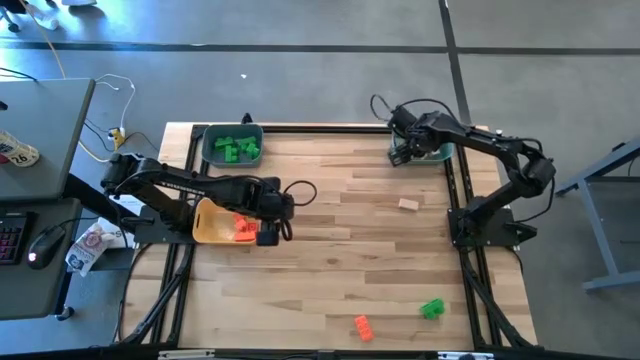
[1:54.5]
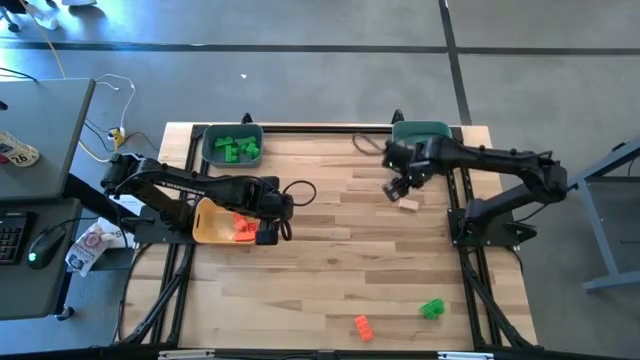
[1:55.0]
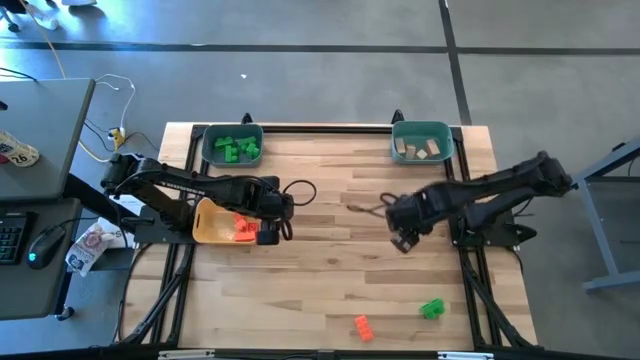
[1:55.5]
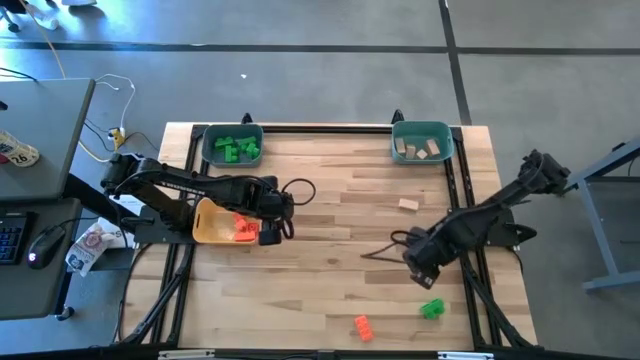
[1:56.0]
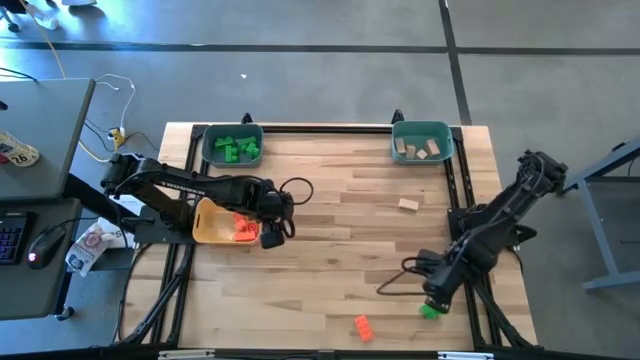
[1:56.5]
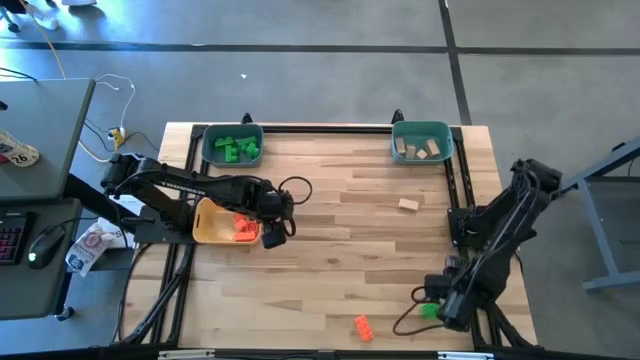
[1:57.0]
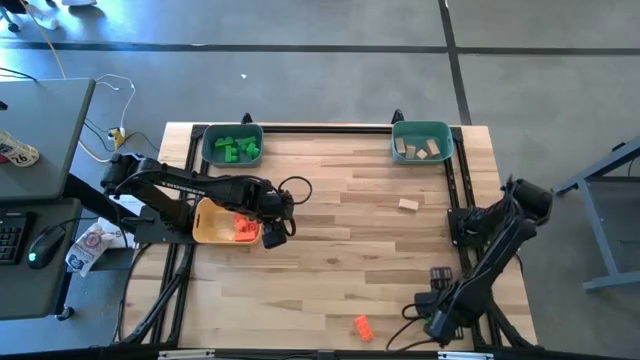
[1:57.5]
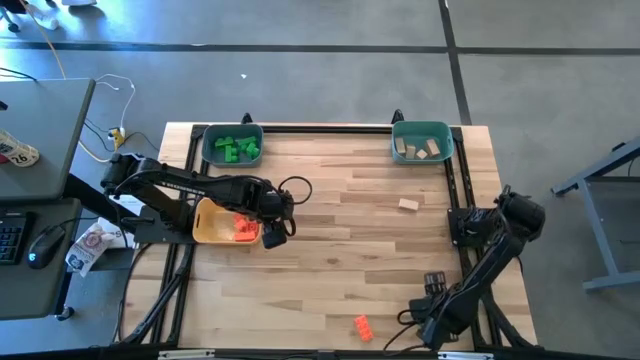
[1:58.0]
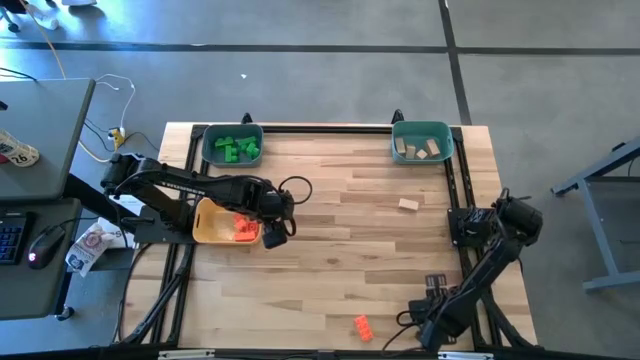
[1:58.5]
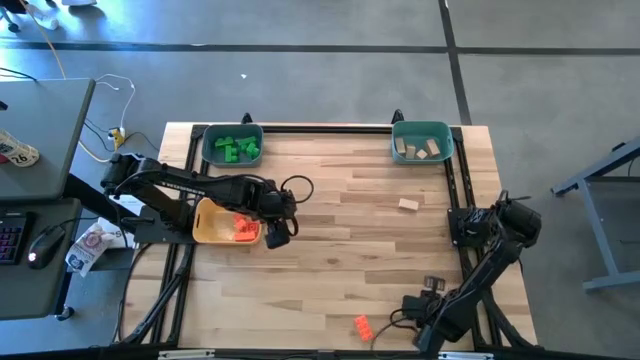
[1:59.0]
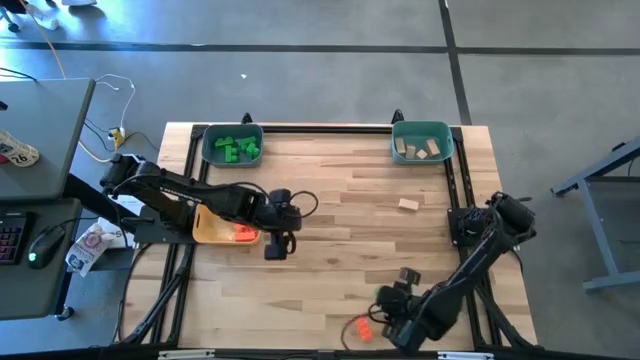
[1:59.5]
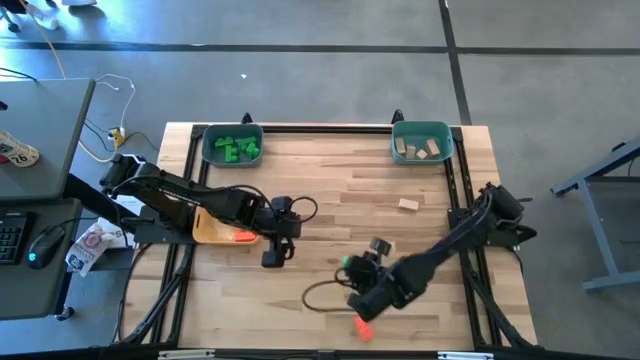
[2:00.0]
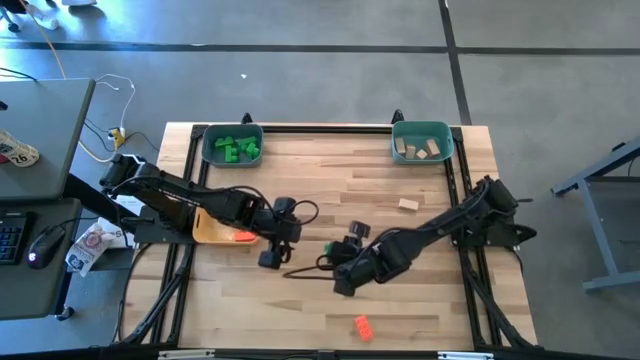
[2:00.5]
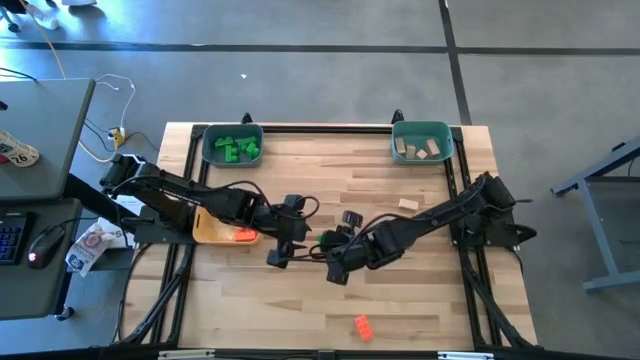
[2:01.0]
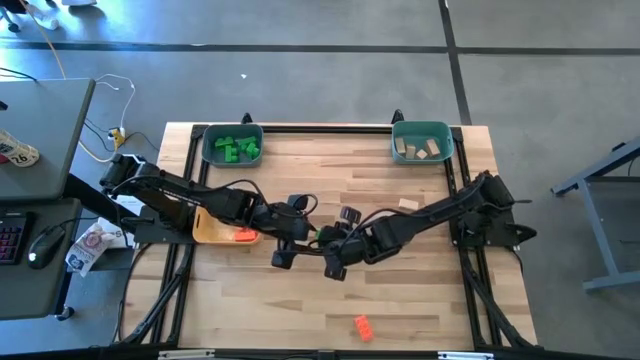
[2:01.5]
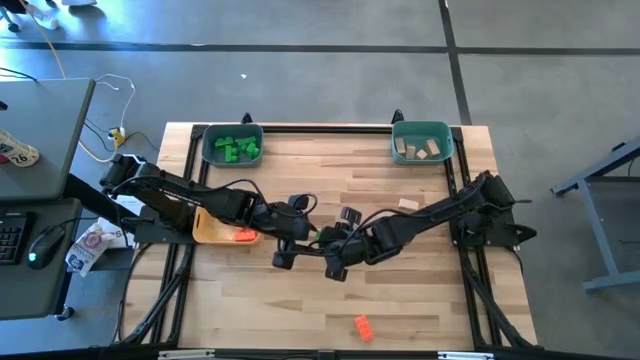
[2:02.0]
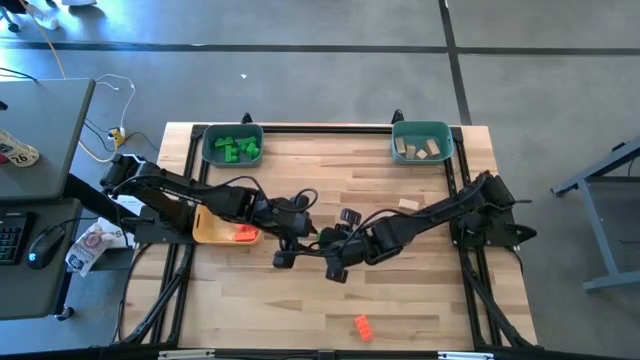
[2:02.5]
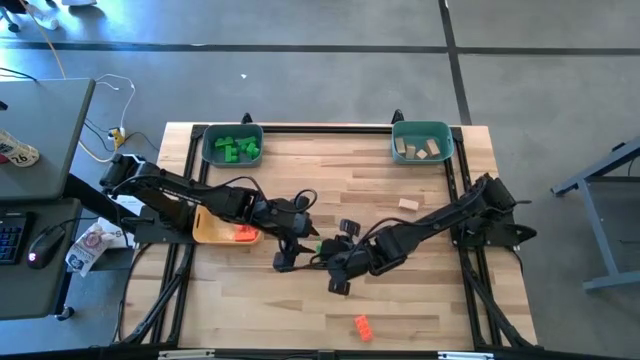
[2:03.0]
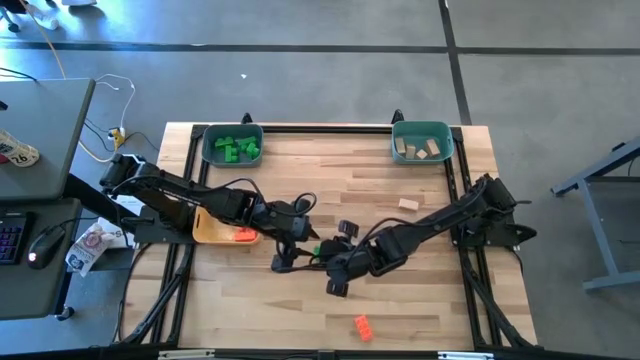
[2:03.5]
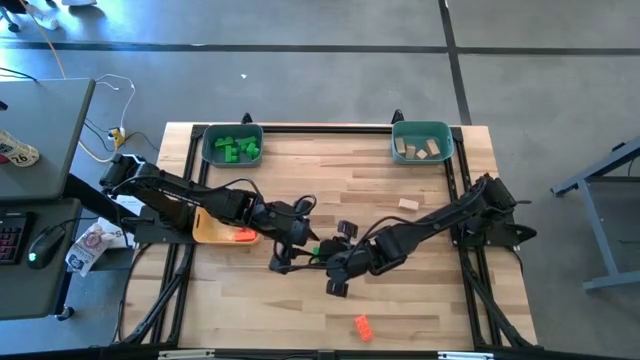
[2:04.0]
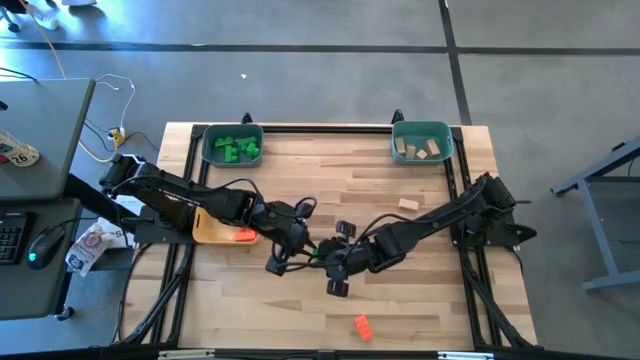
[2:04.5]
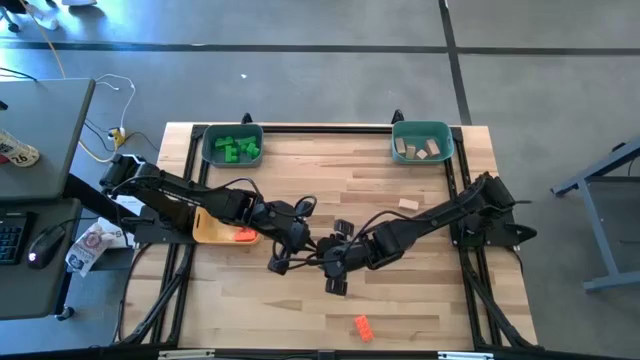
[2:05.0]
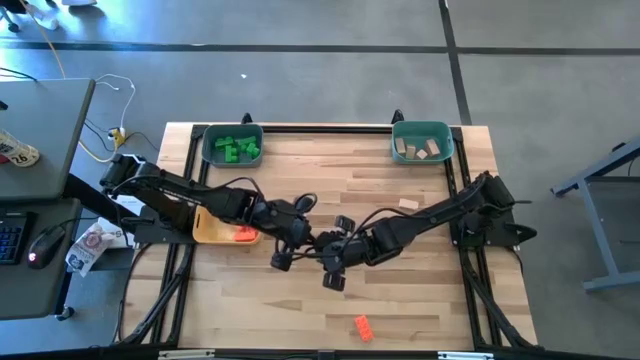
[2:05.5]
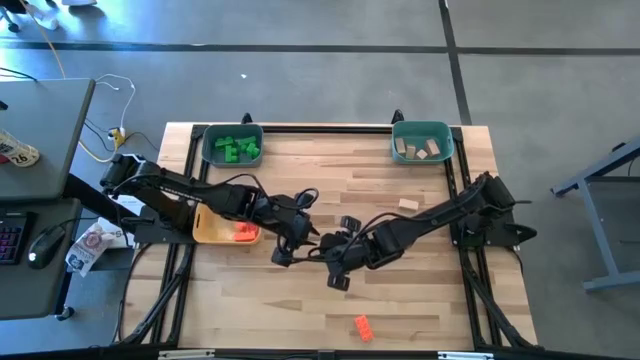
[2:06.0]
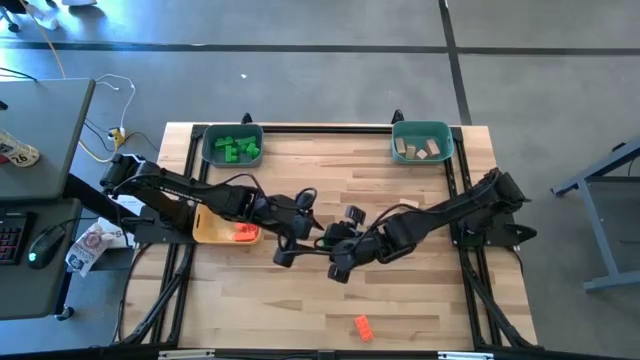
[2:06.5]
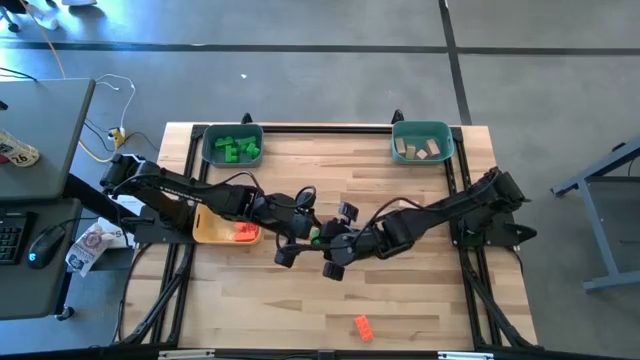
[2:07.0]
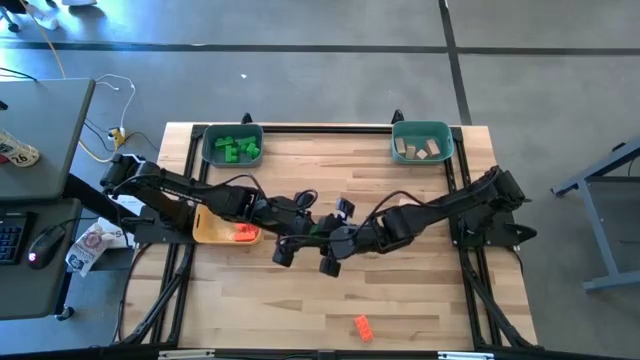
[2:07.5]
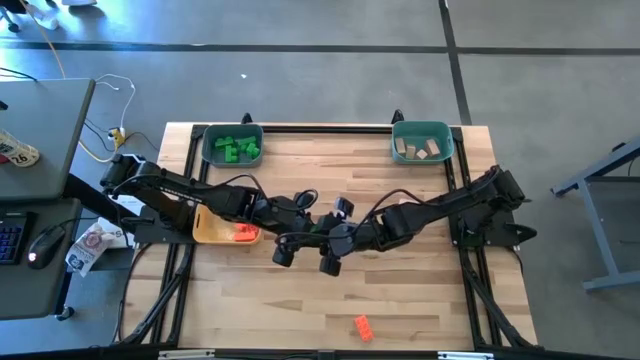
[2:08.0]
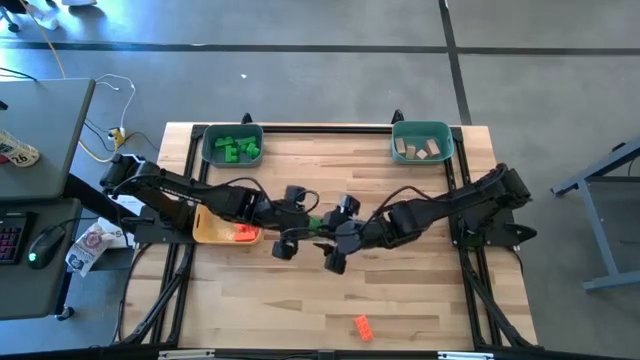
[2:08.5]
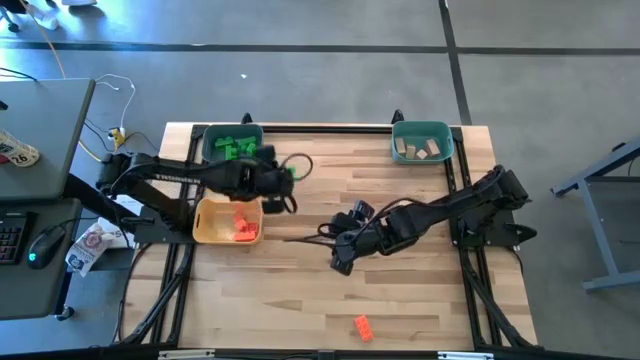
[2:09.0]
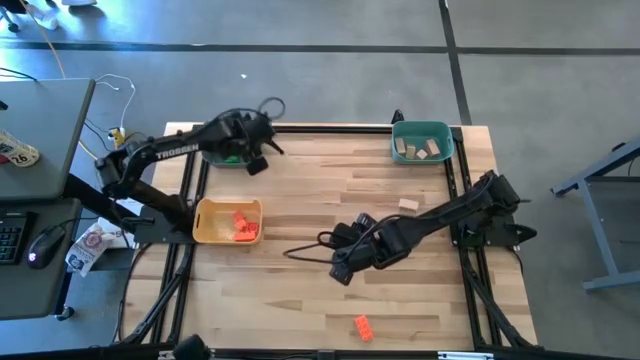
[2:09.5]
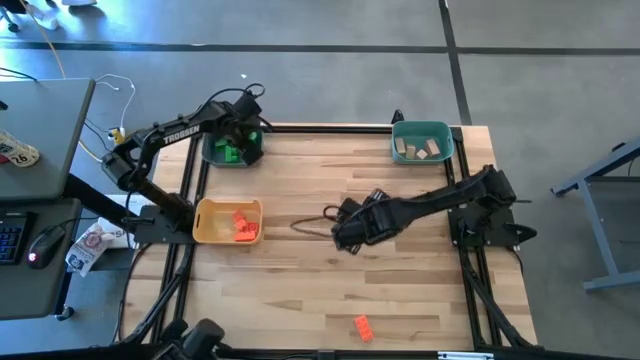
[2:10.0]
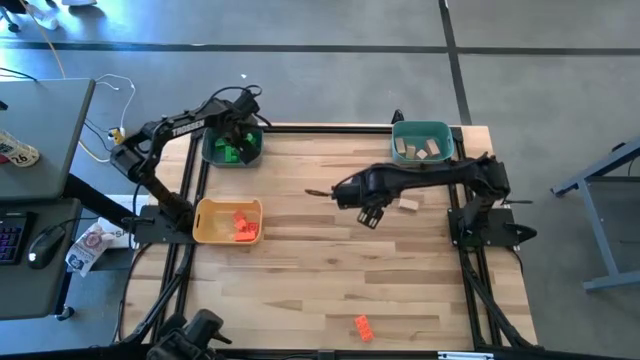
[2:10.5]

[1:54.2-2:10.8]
Task: Sort & place blocks by color
Put the green game piece into the blue bin

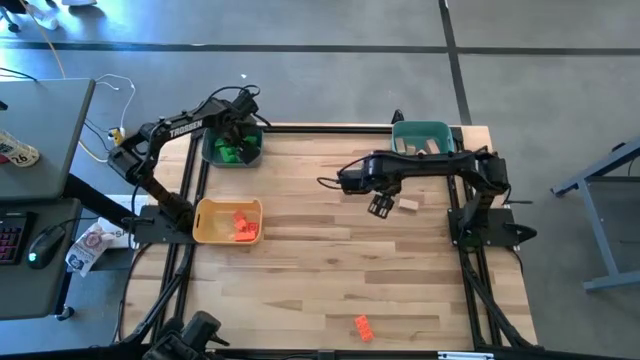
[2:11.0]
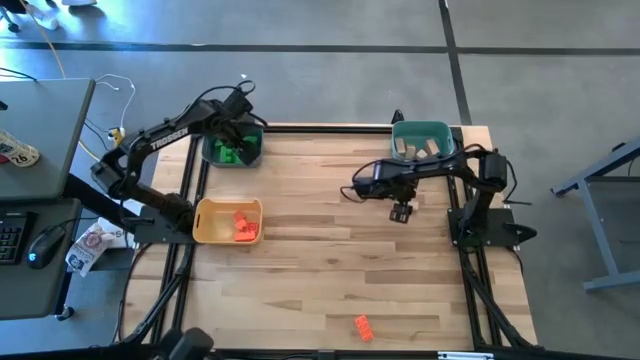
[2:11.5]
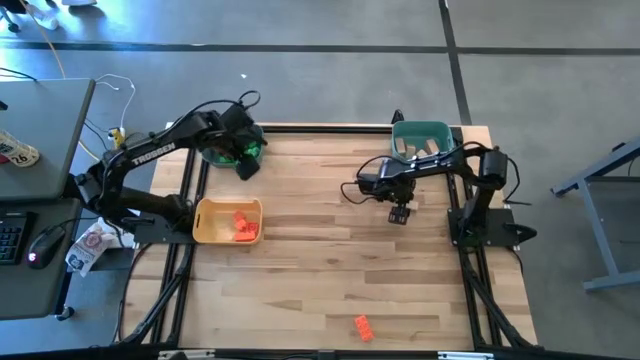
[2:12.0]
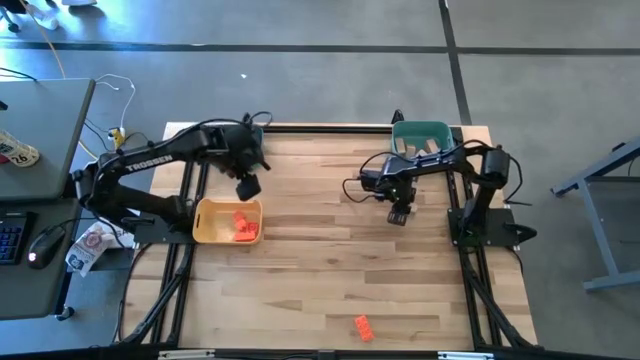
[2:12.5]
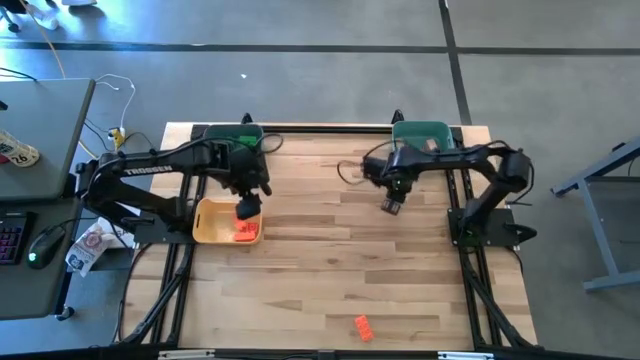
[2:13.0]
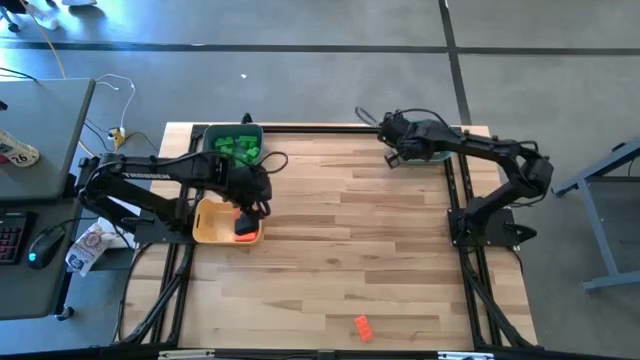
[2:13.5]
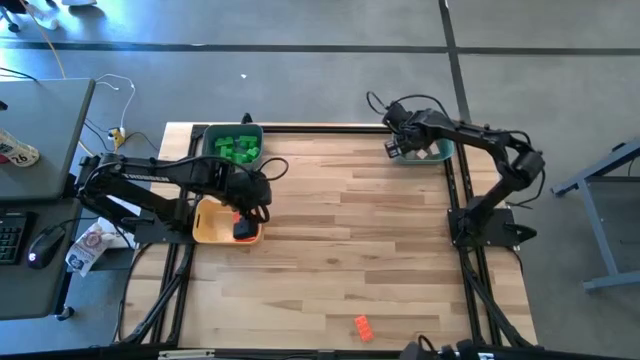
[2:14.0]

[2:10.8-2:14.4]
Put the brown block into the green bin

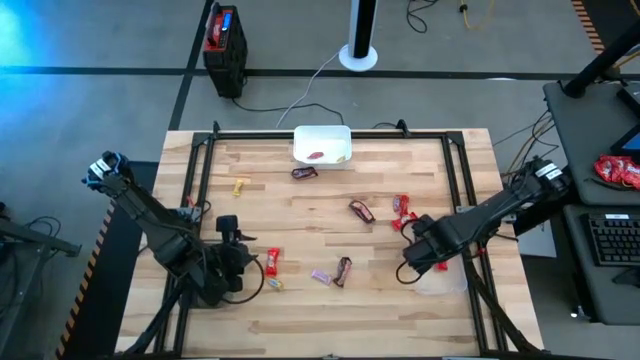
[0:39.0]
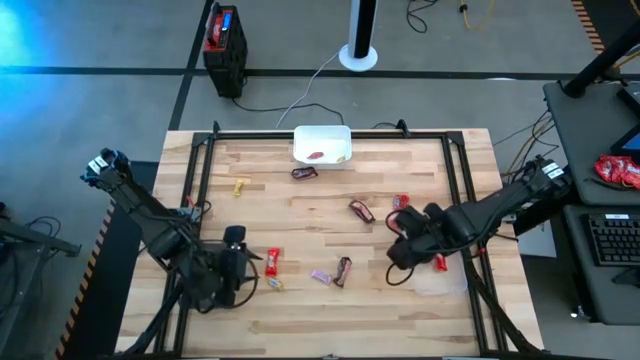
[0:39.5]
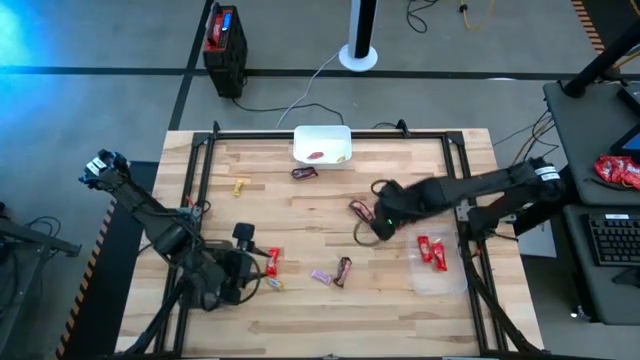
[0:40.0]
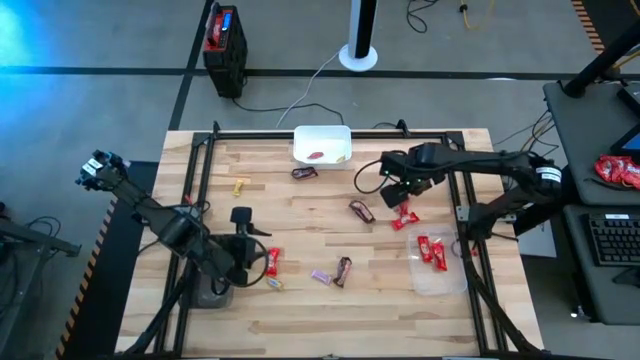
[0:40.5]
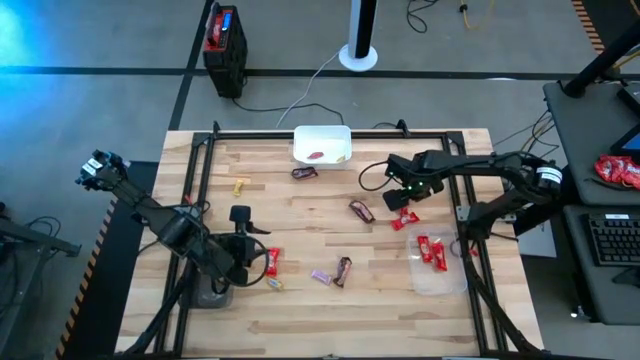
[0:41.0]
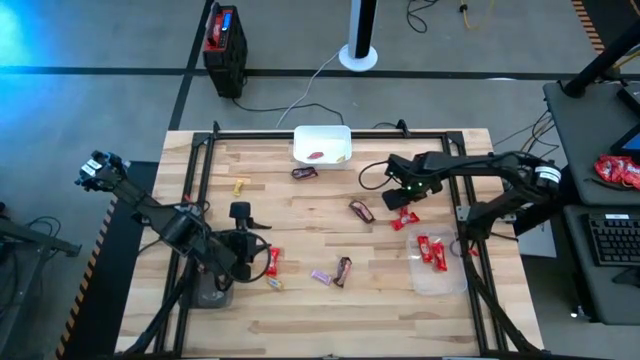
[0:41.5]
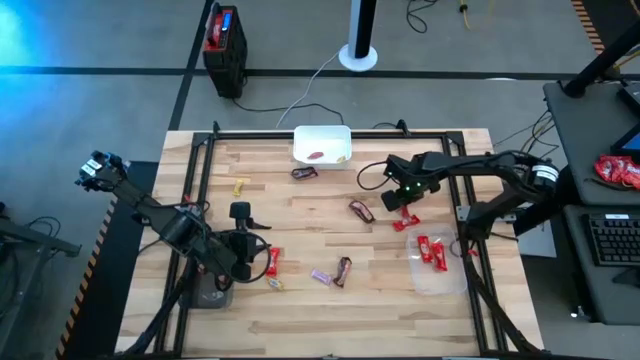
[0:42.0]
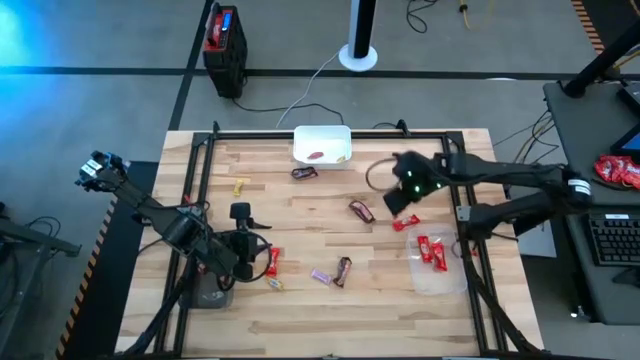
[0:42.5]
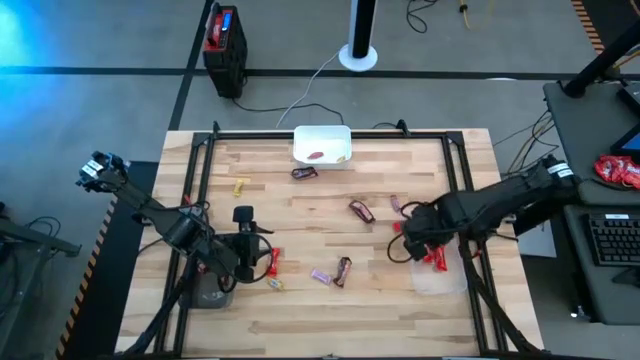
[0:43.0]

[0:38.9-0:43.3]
Task: Sort candy by brand, put in halloween buckets
Put the red chocolate bar into the transparent bin
